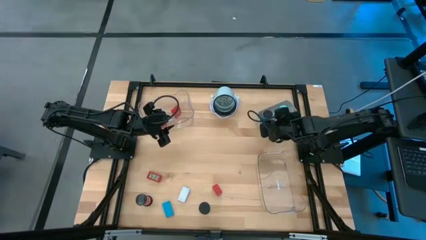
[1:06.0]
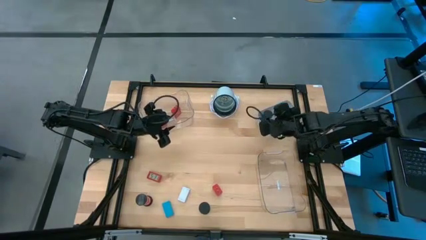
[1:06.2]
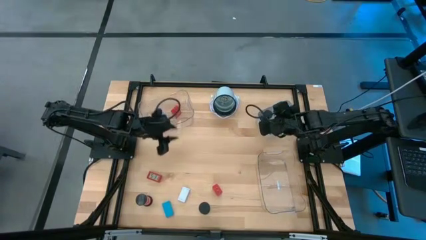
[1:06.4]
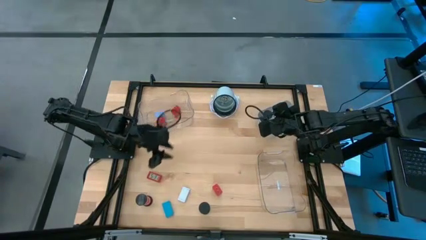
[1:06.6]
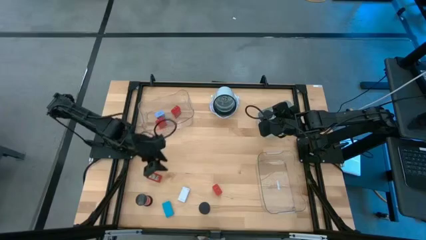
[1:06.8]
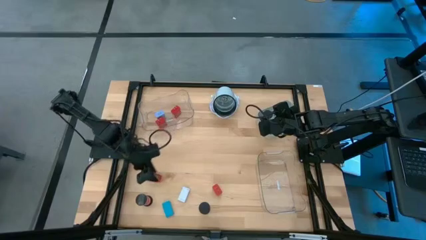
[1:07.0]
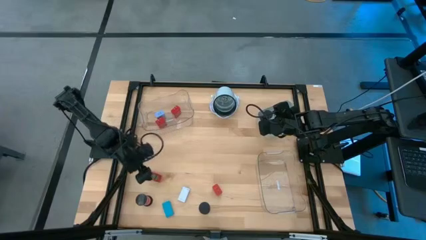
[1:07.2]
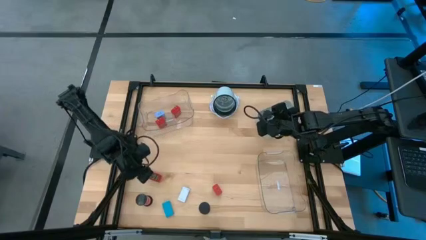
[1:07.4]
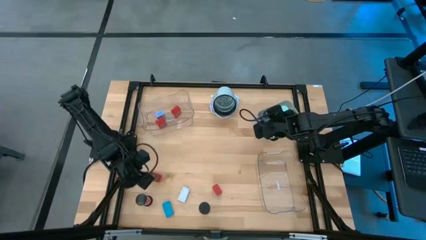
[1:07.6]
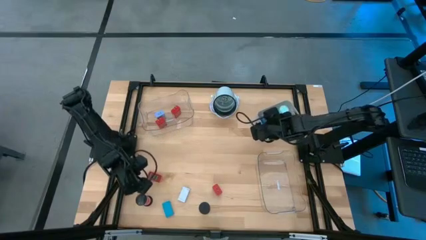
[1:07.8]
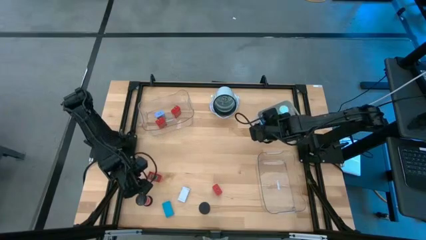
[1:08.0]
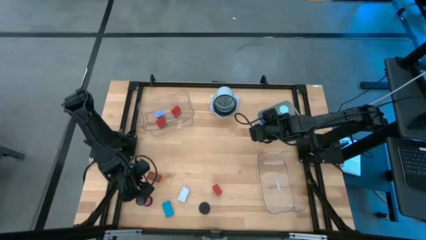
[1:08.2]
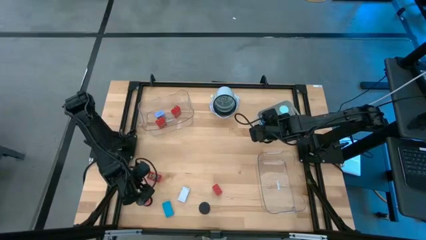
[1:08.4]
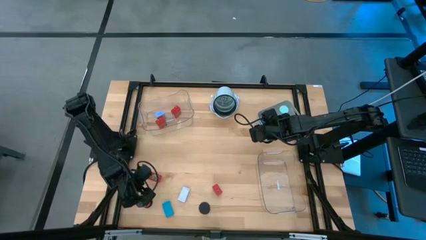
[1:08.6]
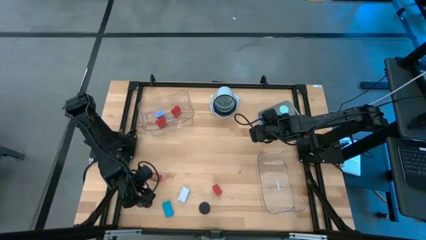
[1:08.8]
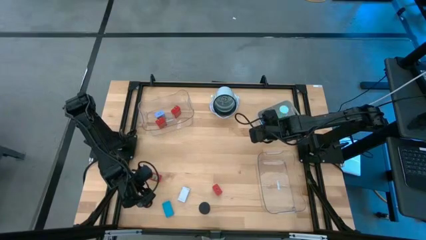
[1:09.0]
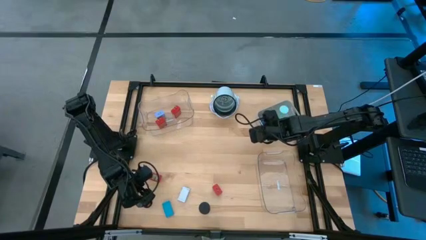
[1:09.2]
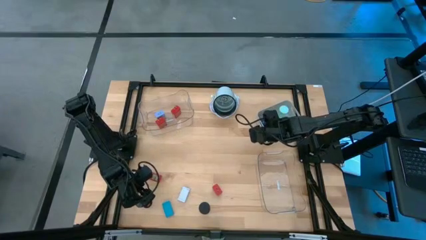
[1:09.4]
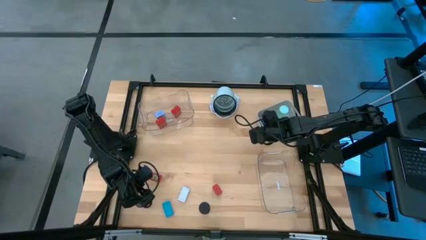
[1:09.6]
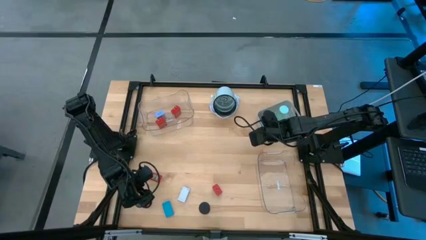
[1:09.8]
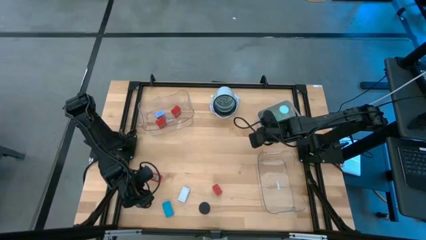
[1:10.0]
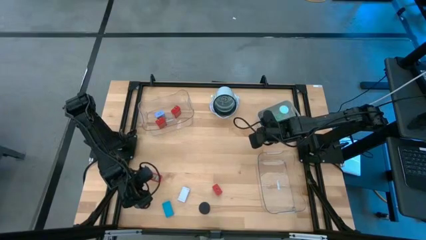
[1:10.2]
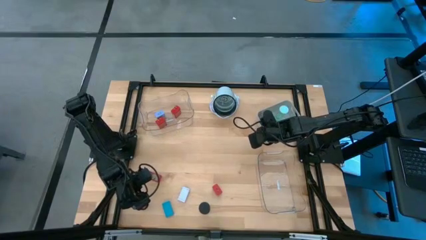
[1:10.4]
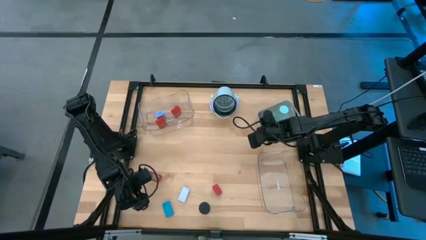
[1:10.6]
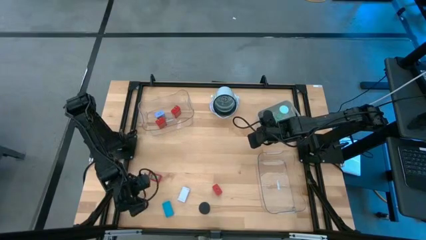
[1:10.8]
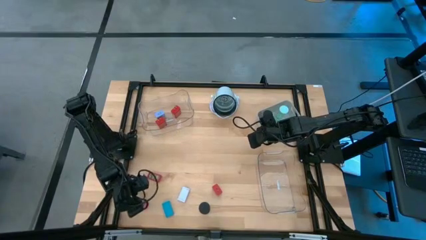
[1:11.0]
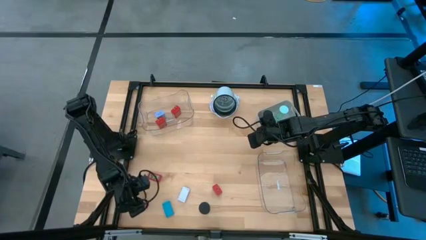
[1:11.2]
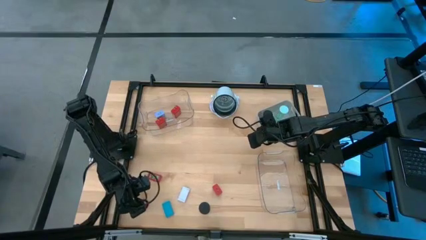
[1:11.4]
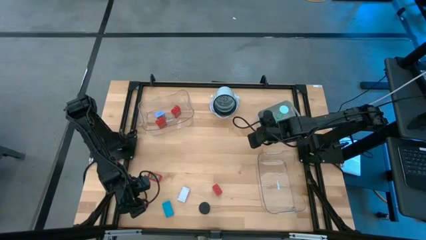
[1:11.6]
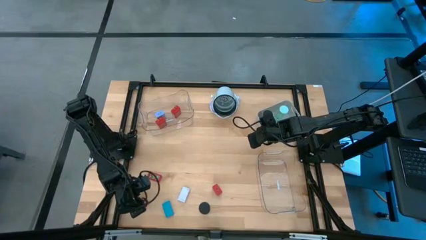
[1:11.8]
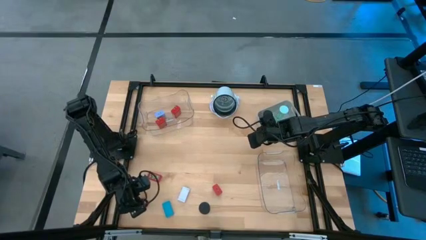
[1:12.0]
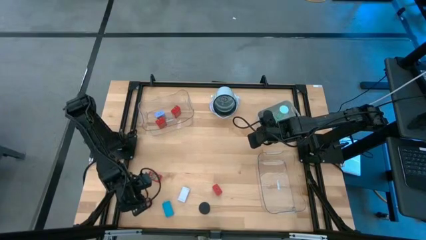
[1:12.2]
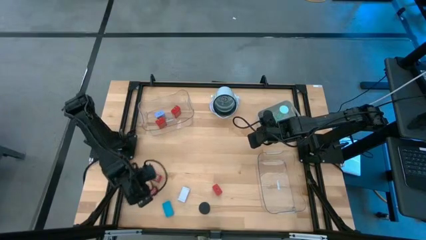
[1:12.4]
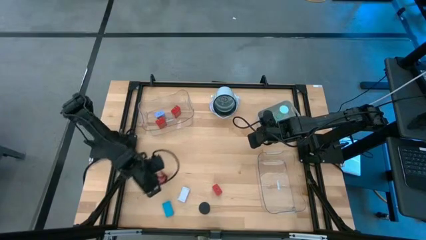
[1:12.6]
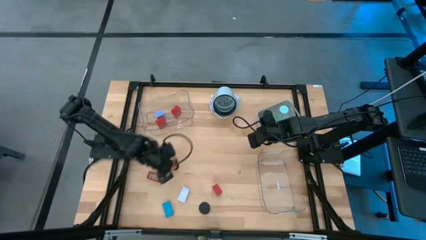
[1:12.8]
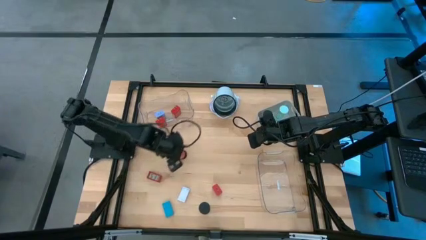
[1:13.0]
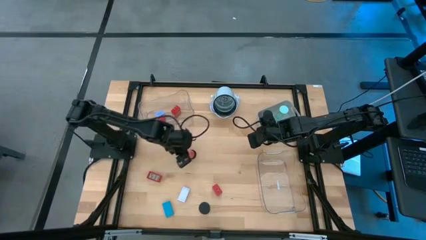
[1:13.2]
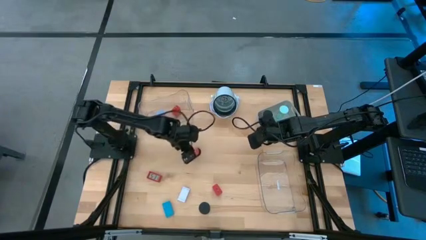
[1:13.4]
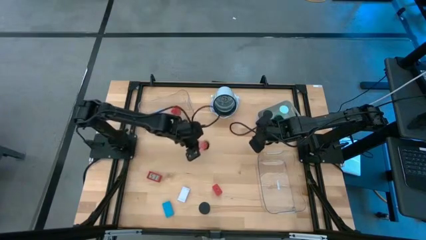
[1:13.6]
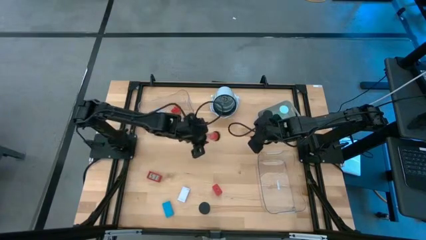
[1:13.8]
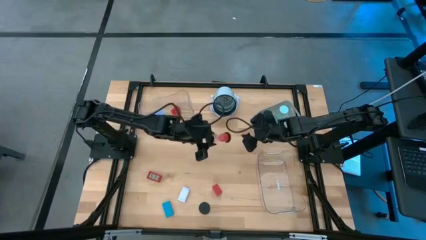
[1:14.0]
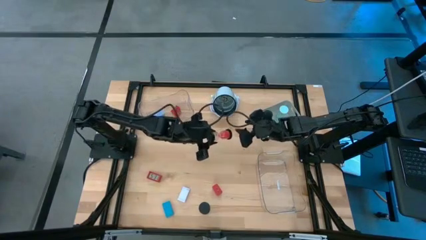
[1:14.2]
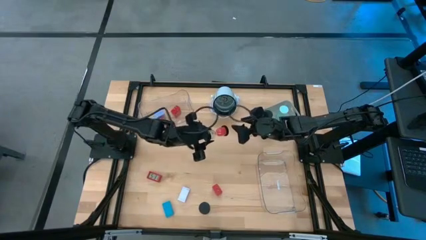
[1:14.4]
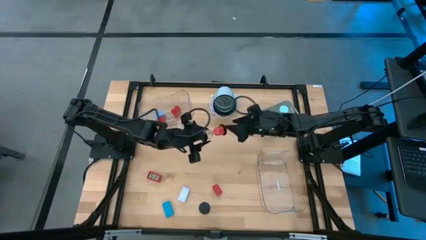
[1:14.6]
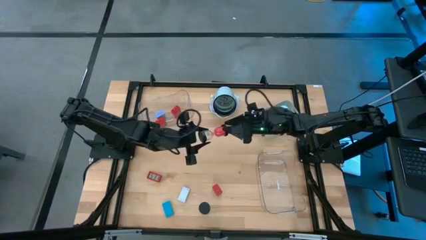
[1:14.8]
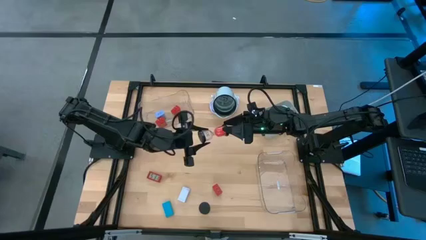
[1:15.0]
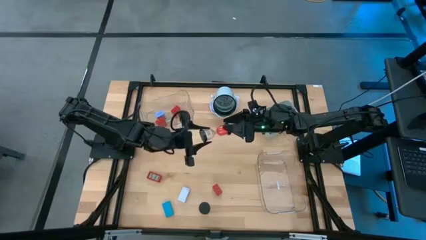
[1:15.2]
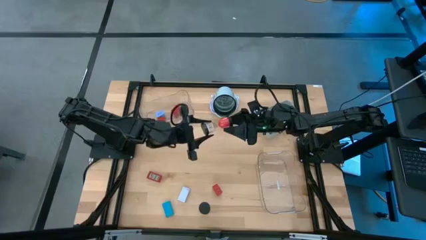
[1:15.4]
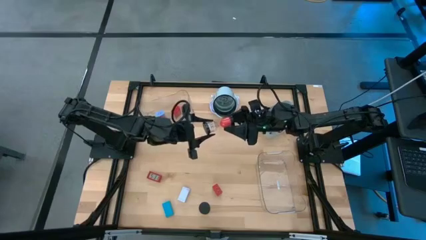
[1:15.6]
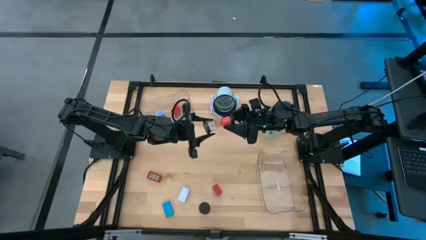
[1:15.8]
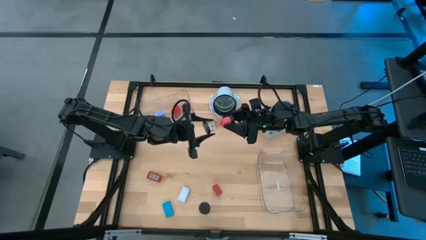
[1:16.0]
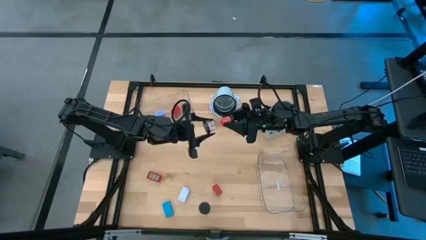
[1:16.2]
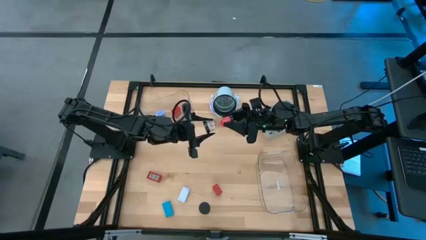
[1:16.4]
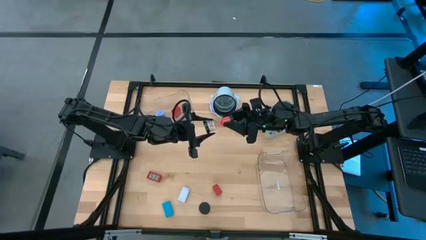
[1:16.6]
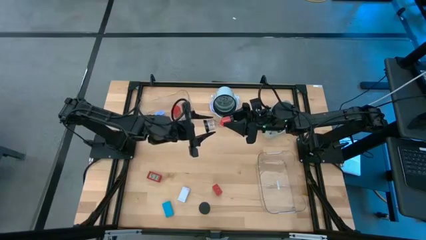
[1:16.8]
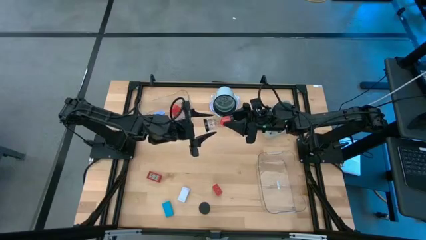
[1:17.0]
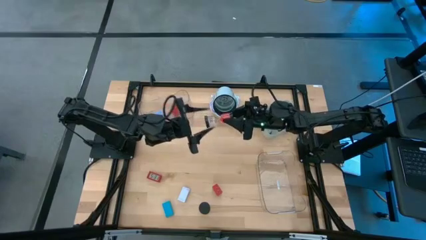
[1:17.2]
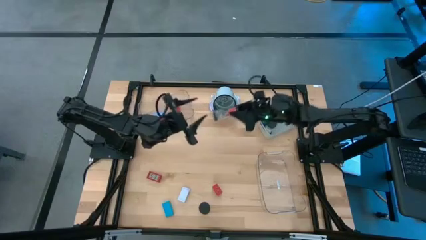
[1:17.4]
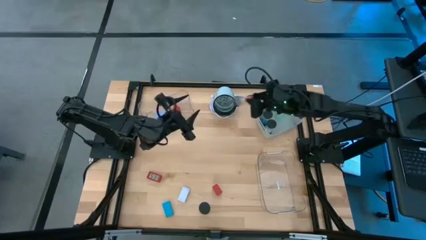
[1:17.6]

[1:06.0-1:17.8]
Task: Pick & Place Office items
Put the red hourglass into the gray bin

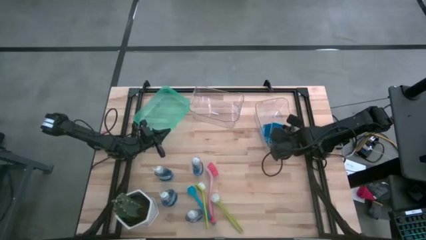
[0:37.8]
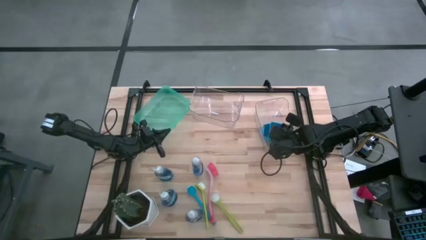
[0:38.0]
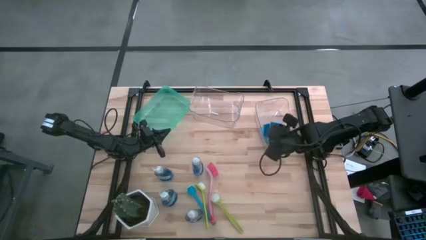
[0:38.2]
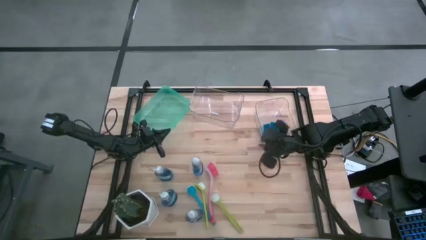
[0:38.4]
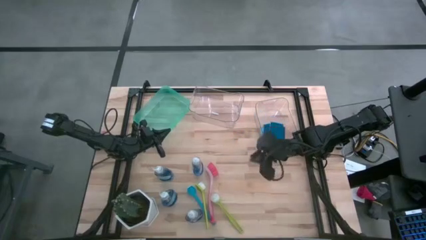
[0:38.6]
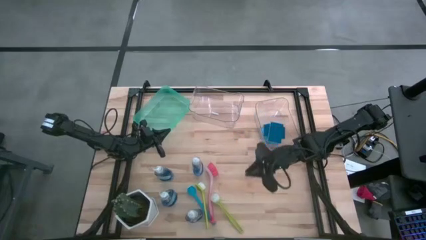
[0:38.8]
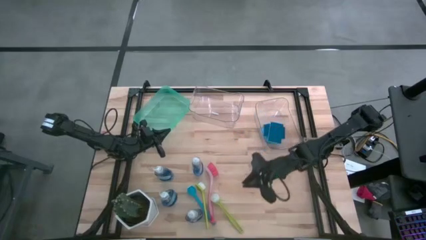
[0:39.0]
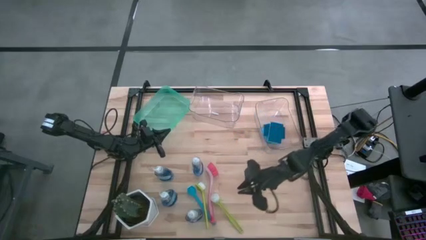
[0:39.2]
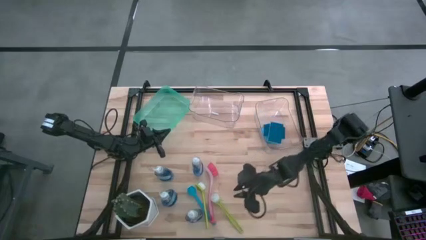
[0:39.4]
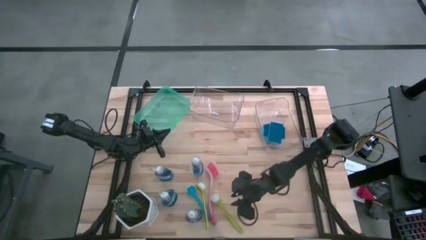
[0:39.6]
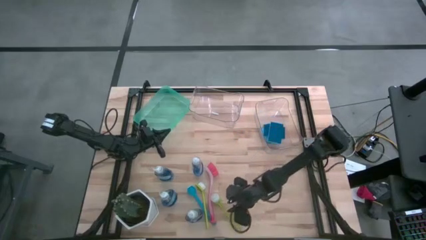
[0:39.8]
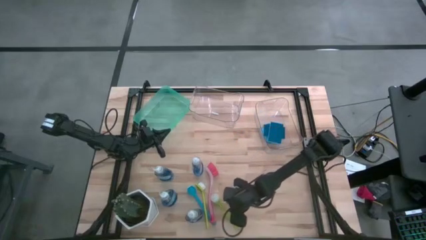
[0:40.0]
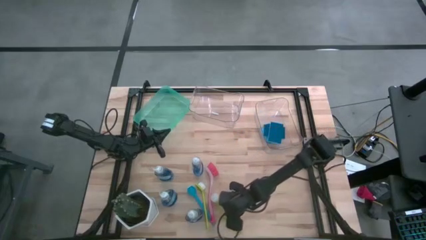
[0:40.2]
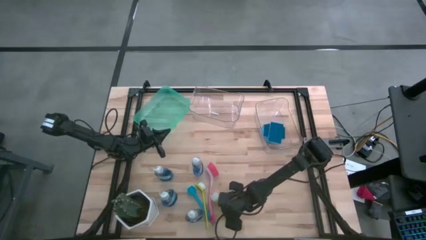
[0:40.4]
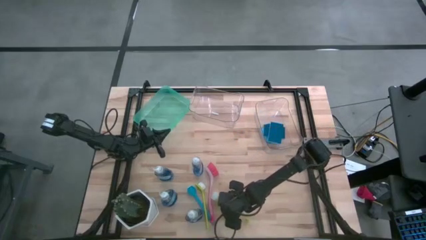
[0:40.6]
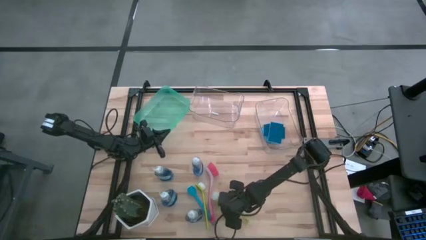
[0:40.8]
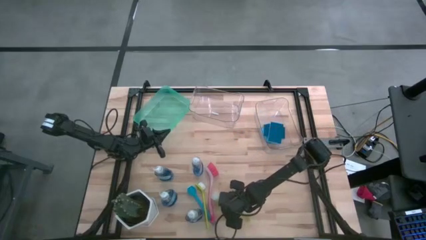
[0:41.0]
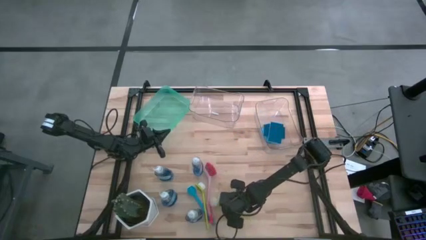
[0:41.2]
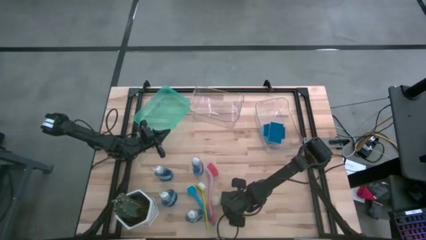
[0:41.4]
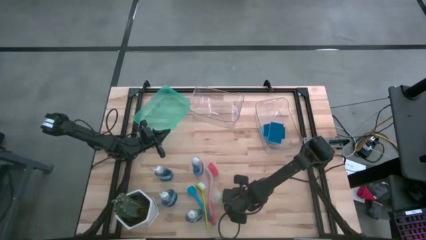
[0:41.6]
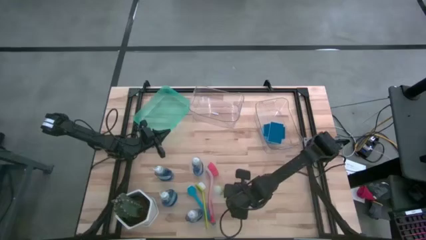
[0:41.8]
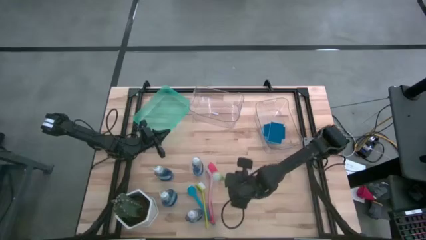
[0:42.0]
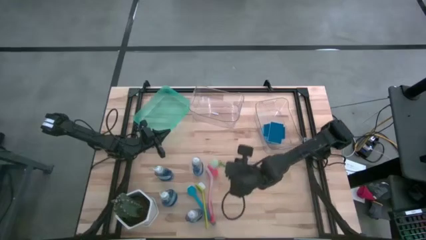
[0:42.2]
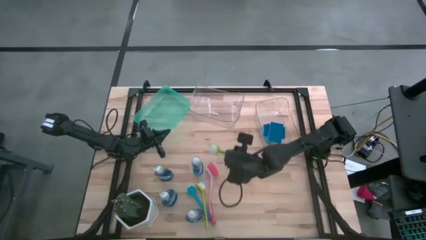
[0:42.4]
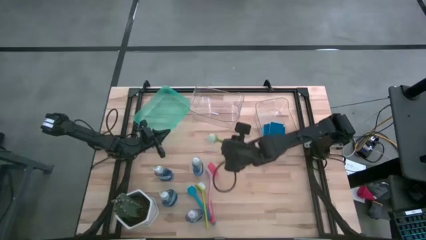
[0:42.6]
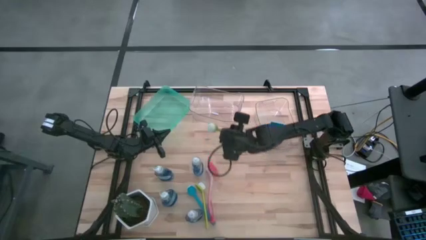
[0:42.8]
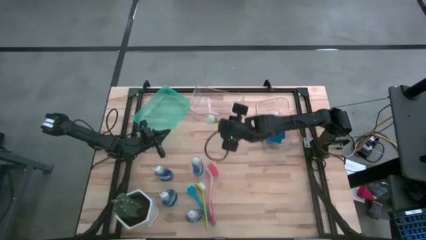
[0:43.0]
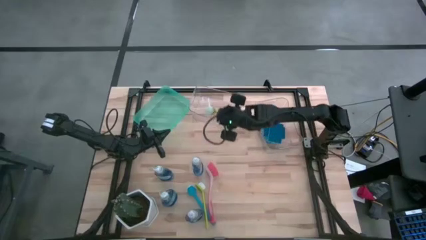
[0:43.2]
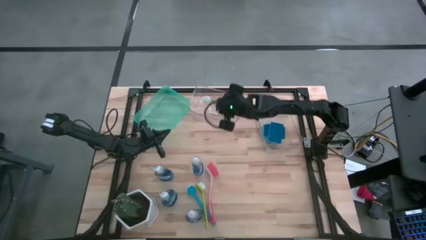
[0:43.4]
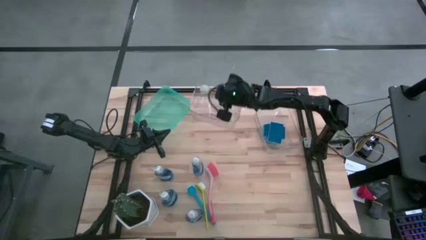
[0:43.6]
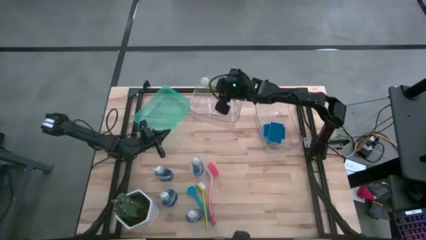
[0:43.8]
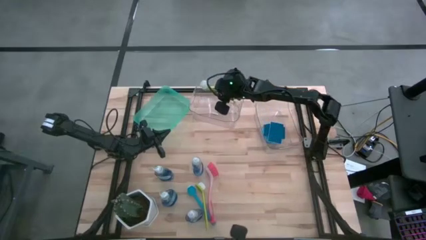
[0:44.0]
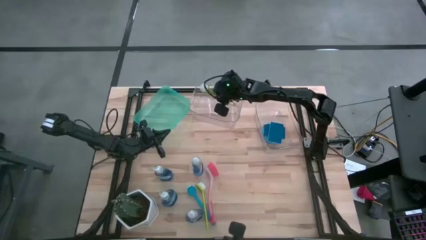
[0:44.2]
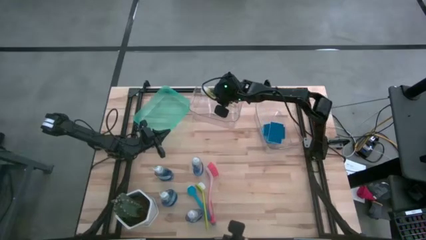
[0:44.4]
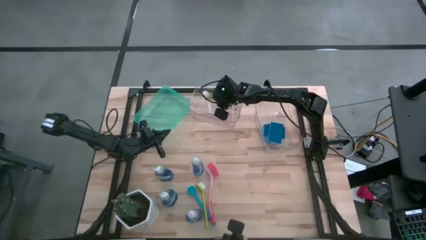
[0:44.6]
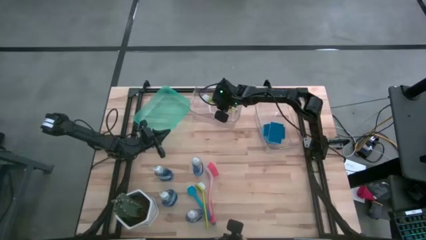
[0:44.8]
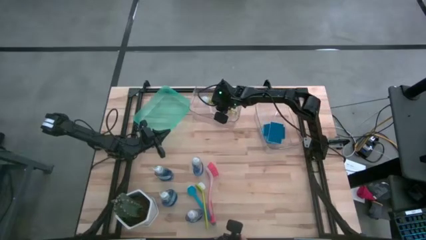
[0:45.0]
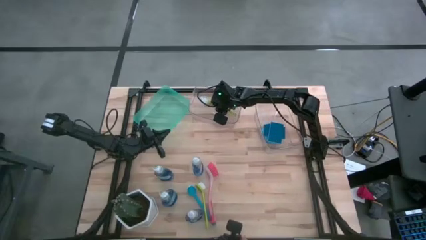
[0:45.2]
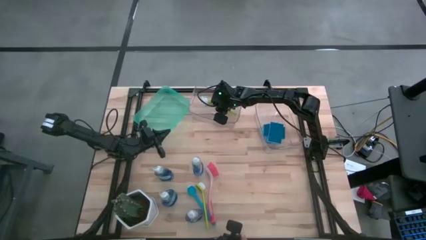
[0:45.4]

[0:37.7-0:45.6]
Task: Pick & Place Kitchen Sink Supplies
Put the green dish brush in the left transparent bin
